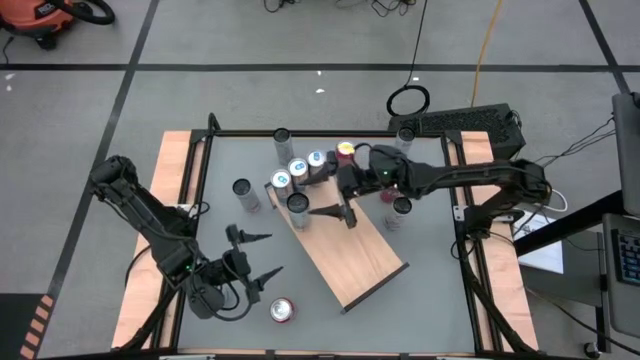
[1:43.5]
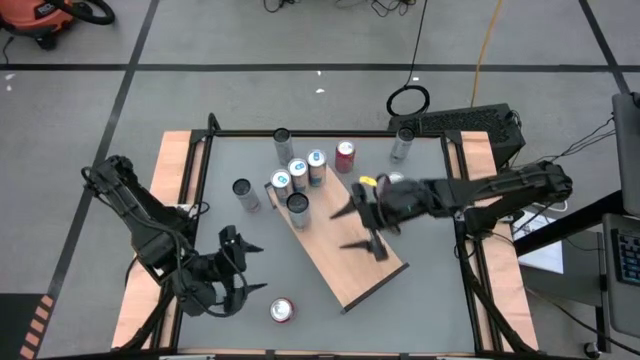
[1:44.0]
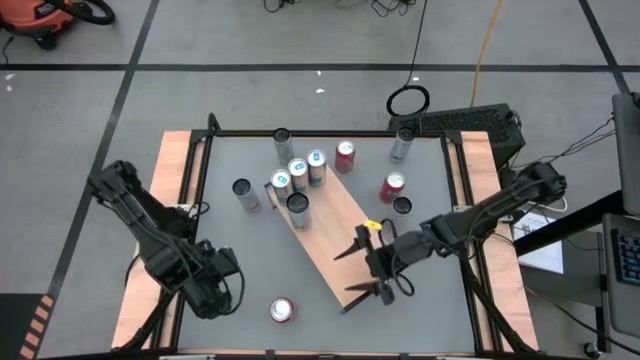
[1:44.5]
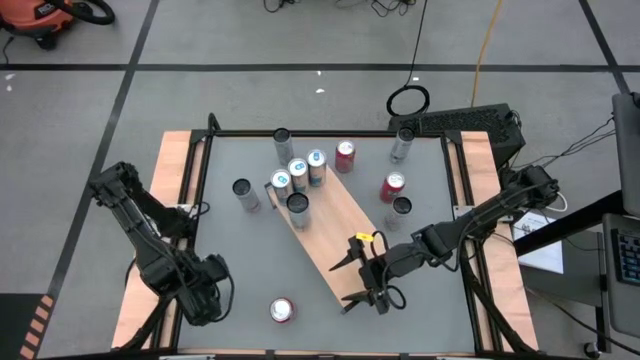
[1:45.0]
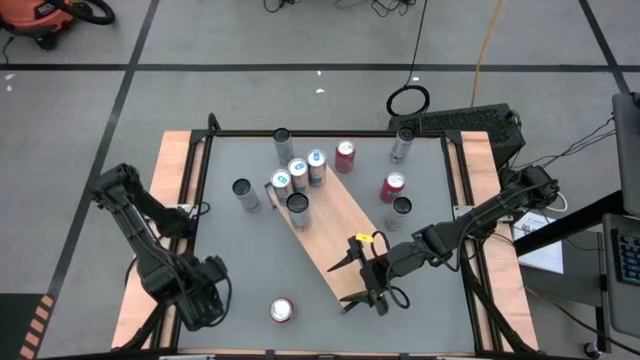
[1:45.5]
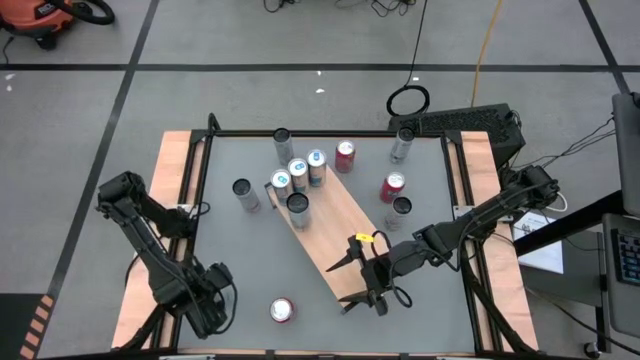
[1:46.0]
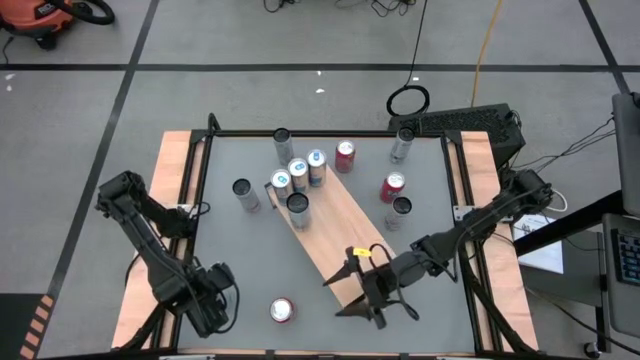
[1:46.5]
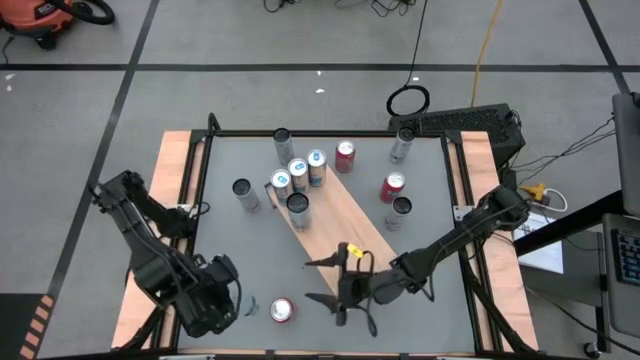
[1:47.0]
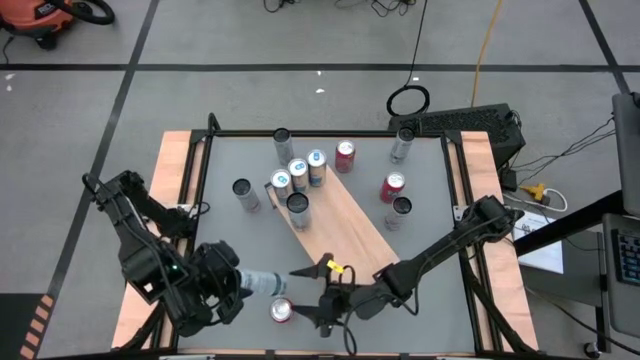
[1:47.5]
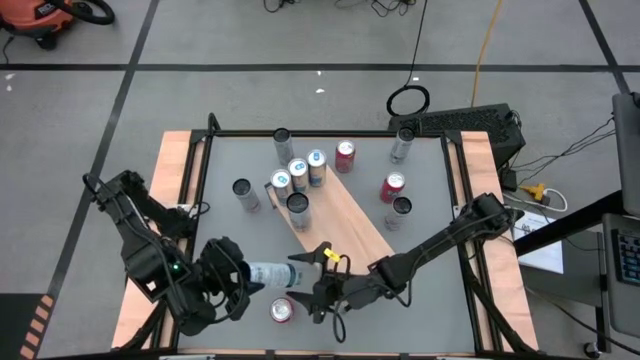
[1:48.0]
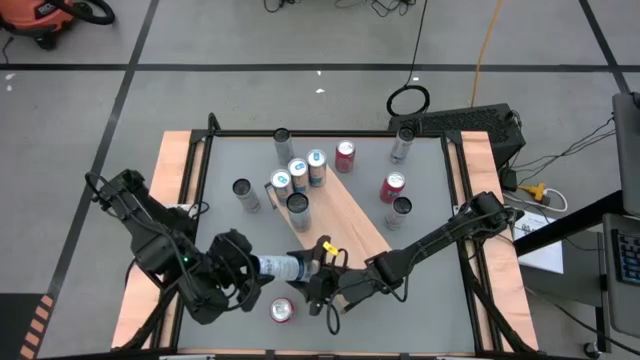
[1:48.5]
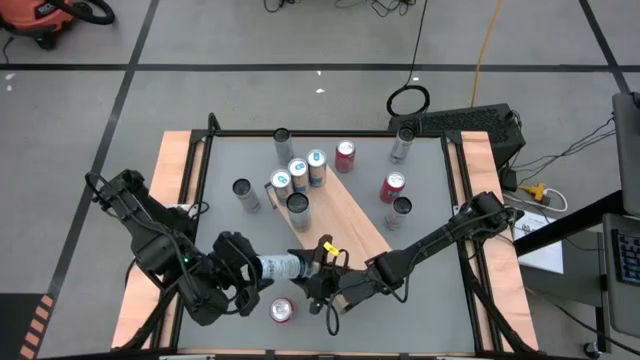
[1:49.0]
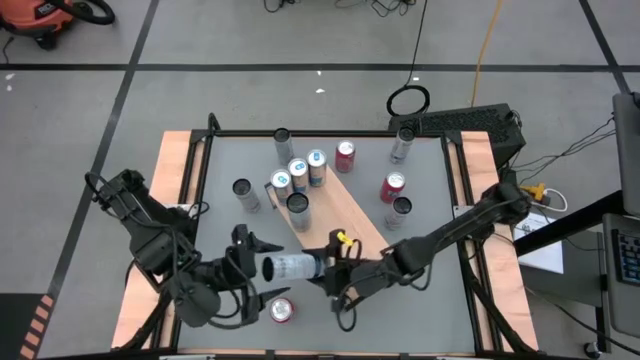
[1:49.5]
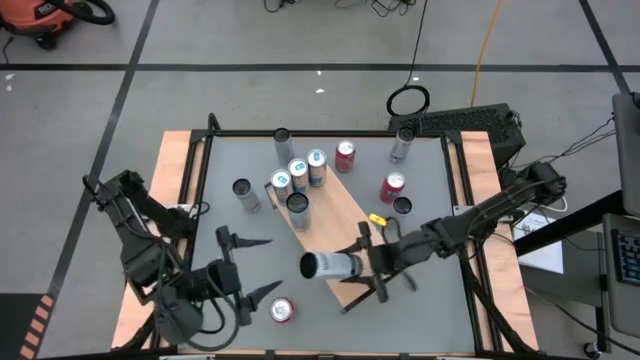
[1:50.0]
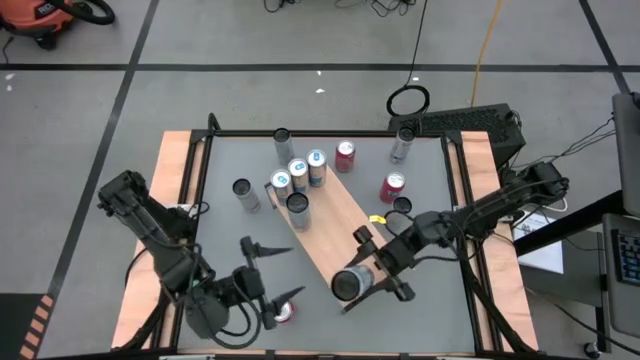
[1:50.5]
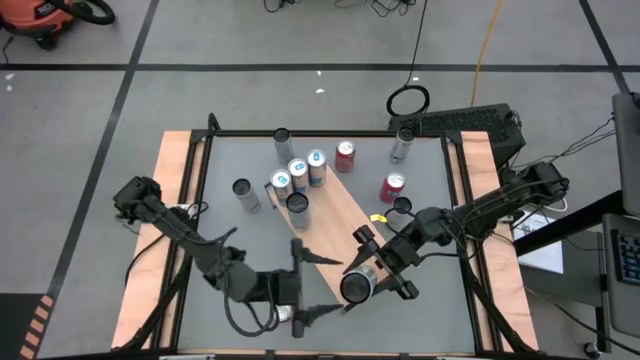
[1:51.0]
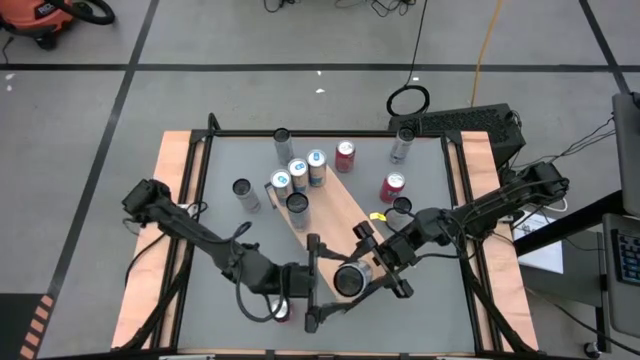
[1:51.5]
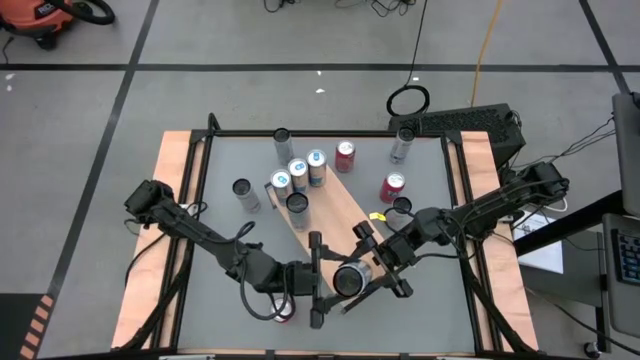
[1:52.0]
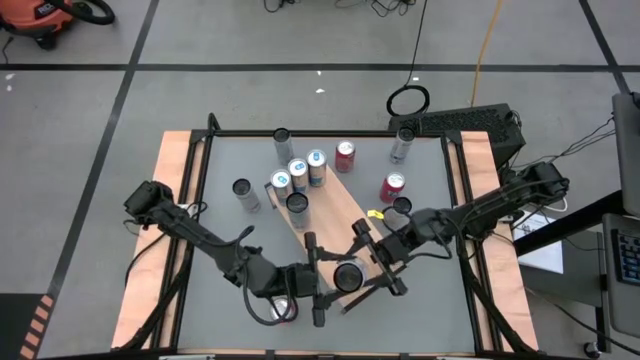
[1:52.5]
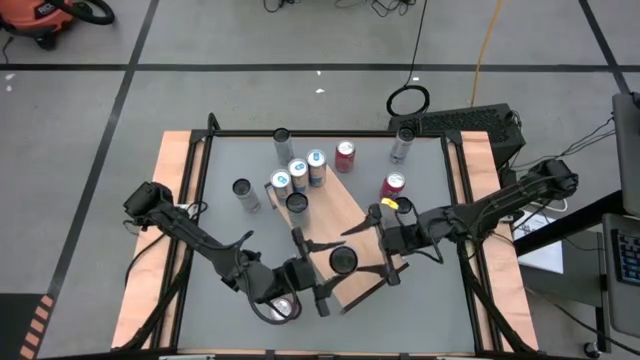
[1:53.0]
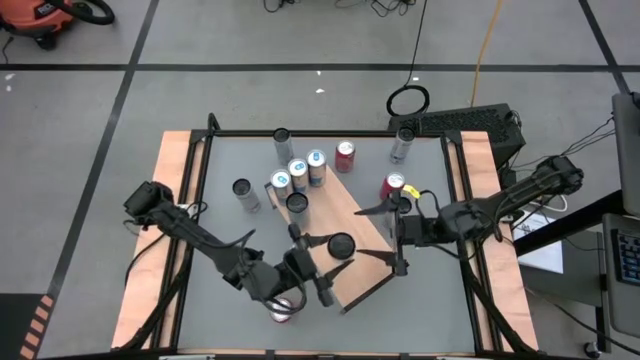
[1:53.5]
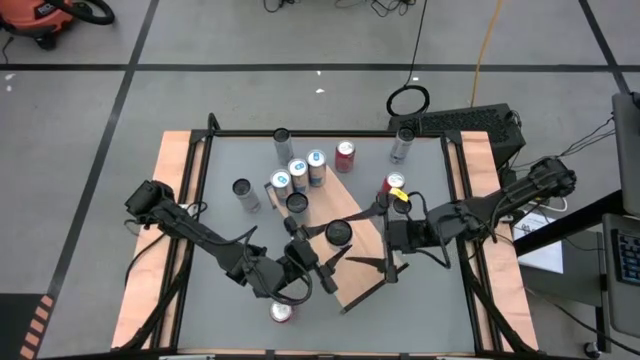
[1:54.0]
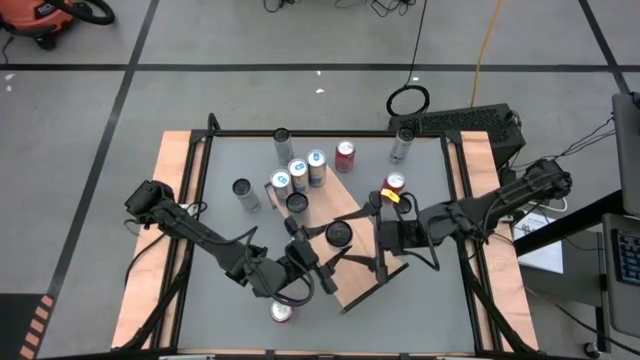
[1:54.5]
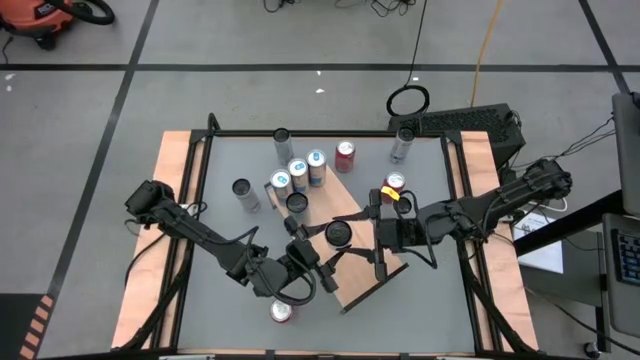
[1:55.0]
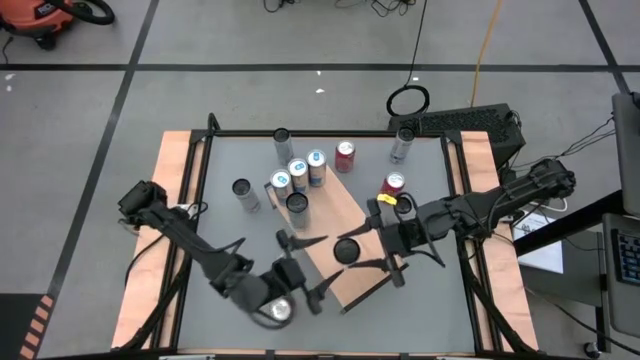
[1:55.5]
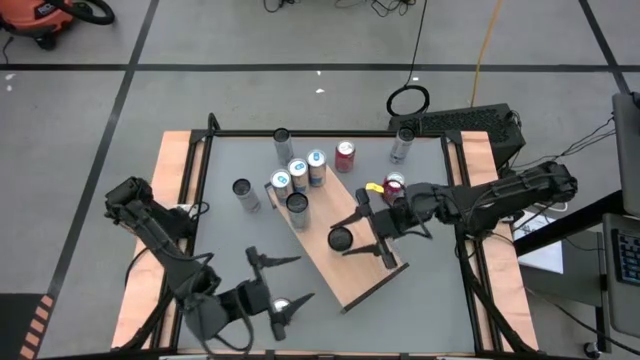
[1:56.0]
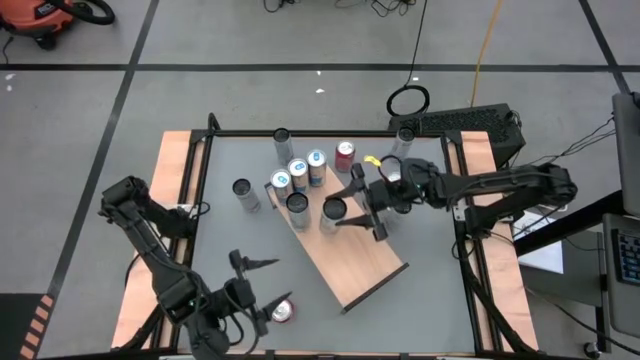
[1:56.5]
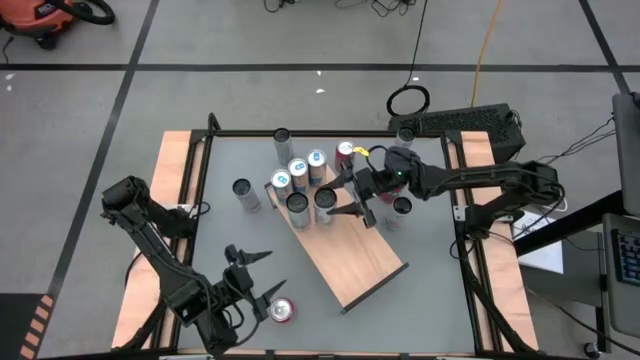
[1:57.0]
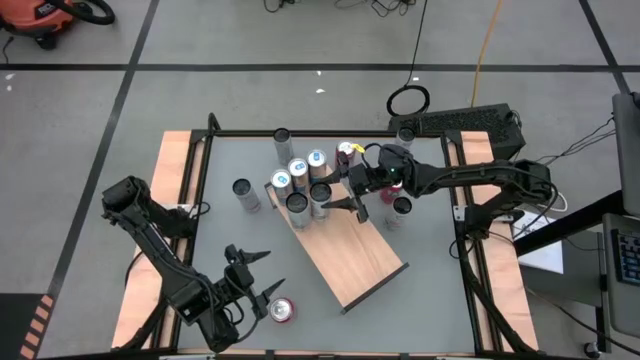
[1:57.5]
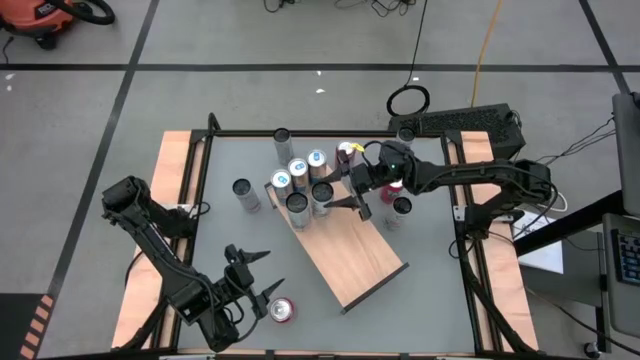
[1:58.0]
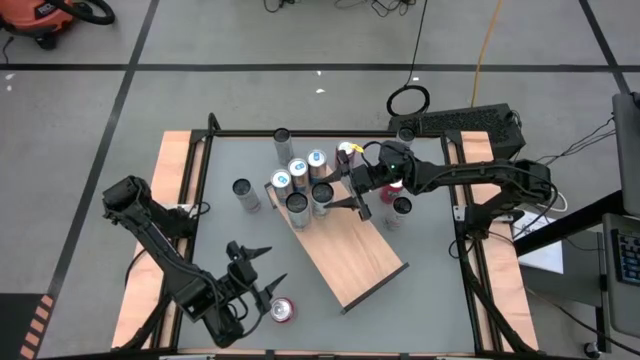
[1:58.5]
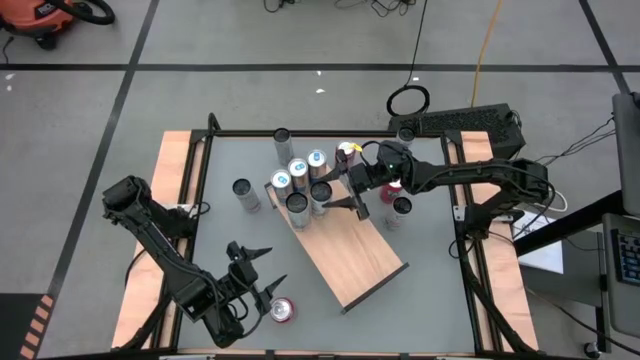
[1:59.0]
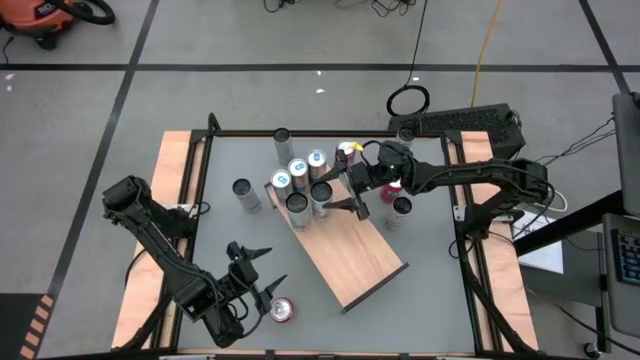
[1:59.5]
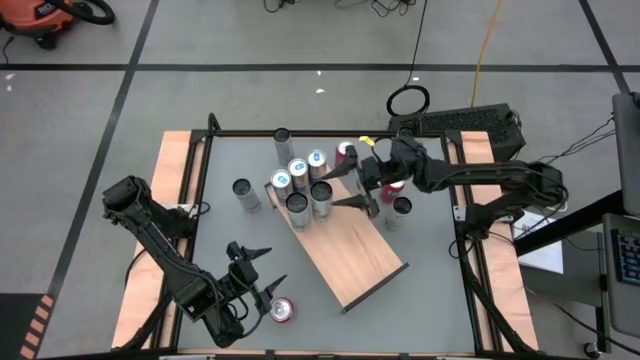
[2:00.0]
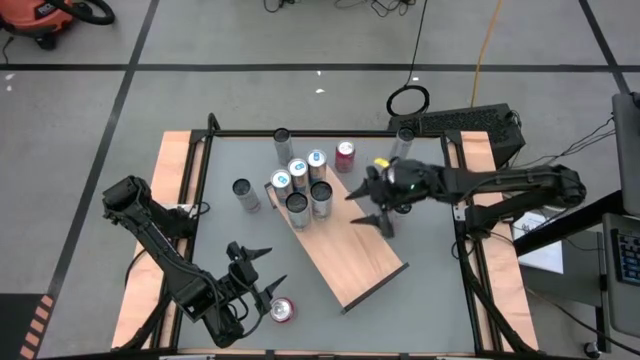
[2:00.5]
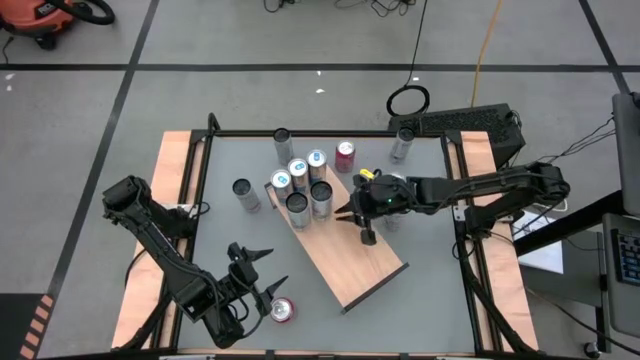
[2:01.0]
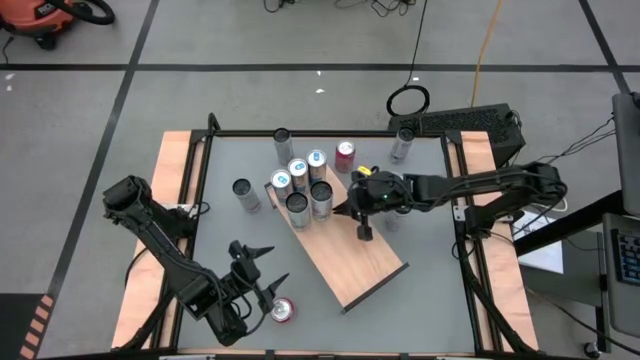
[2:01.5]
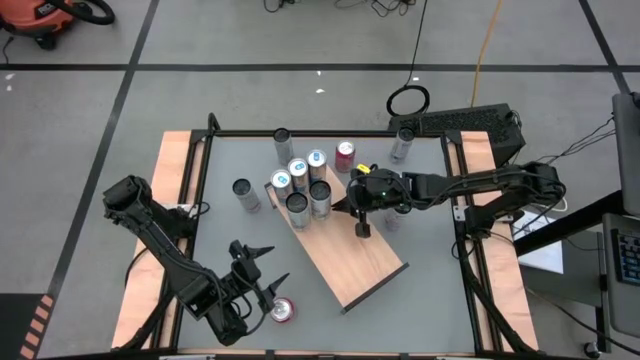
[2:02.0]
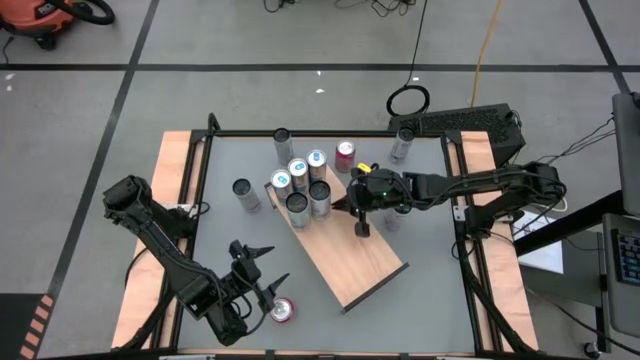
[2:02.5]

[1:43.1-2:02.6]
Task: Place canned beverage on shelf
Put the left white soda can on the shelf aligned with the other white soda can

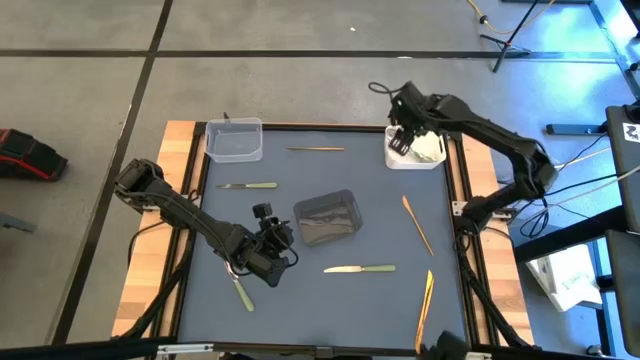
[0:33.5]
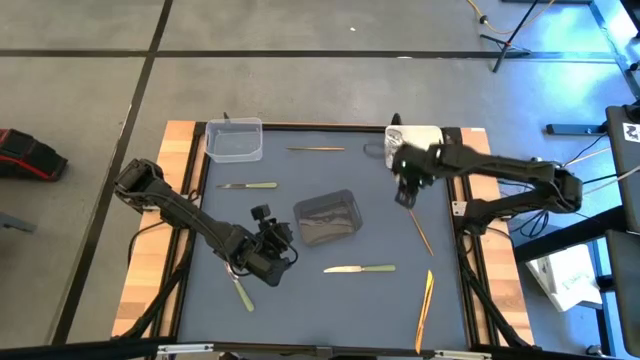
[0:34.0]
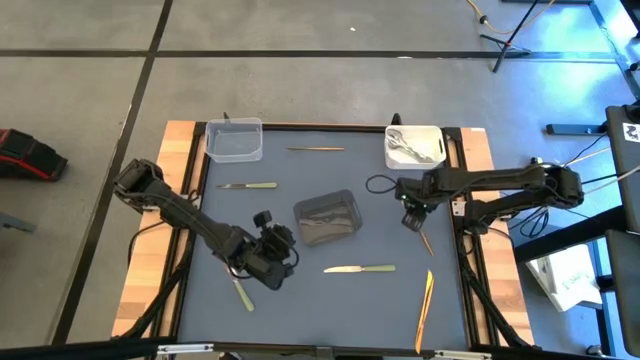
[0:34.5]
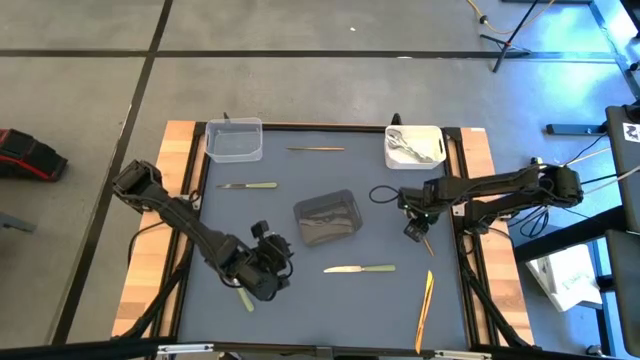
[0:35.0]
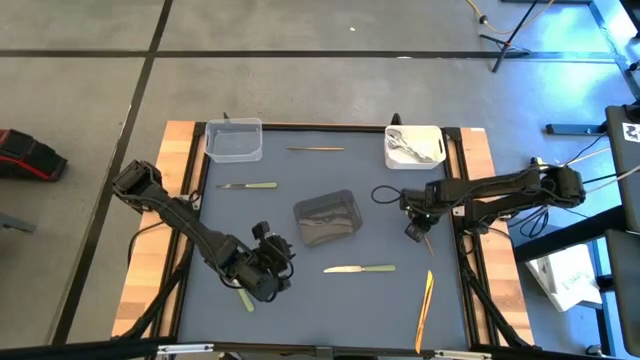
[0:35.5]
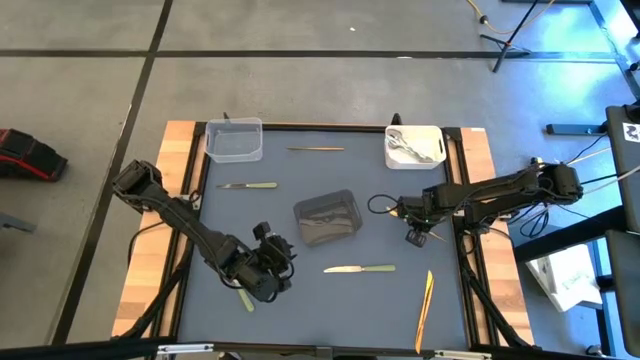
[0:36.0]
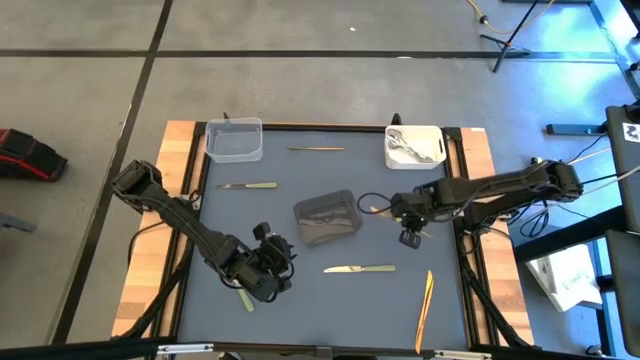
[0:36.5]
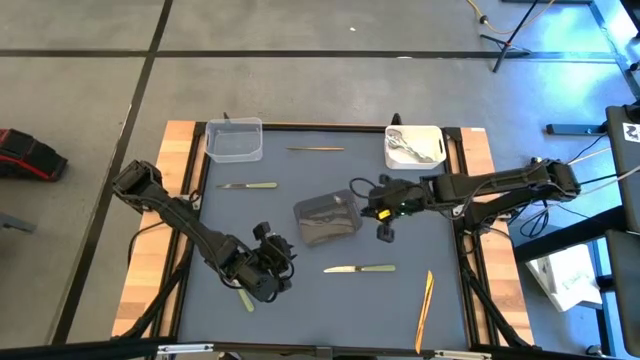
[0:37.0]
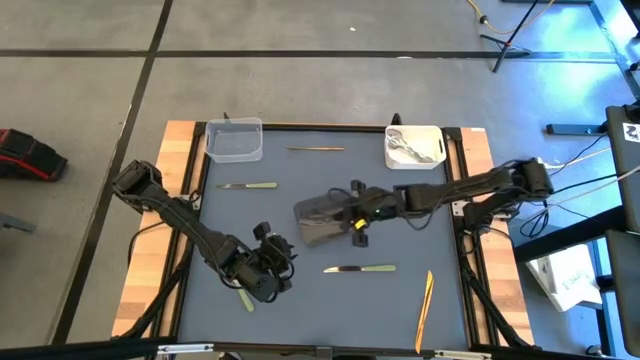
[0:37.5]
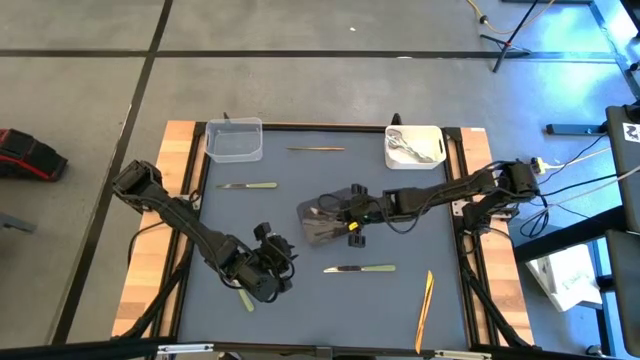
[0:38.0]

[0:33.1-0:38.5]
Task: Sort silverware by color (type)
Put the gold table knife into the black bin
